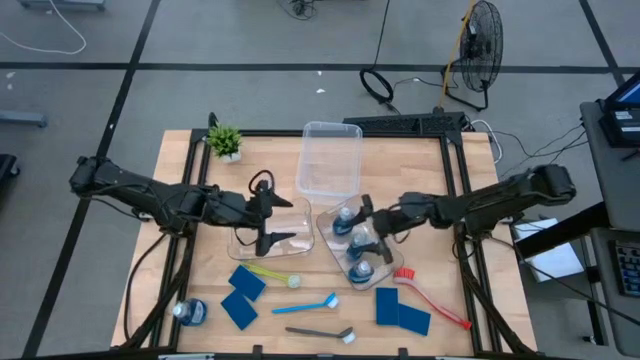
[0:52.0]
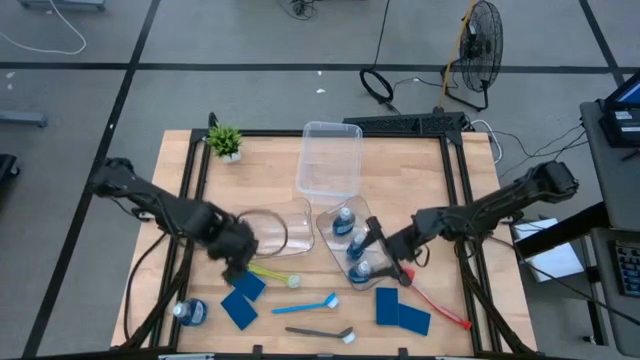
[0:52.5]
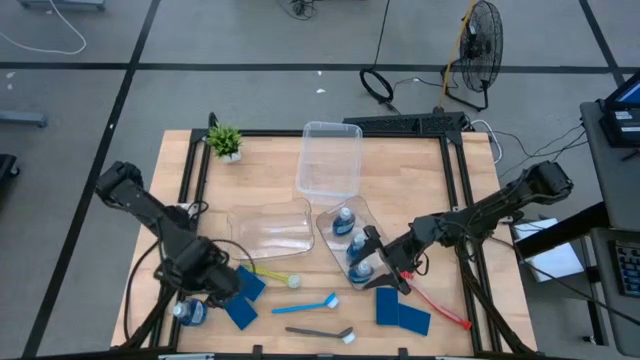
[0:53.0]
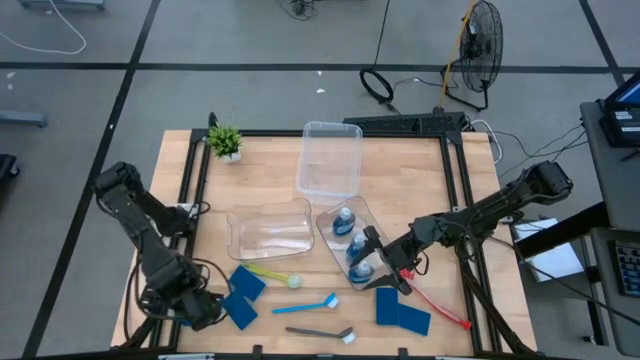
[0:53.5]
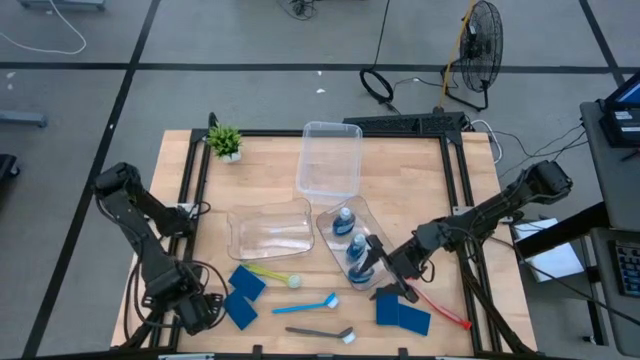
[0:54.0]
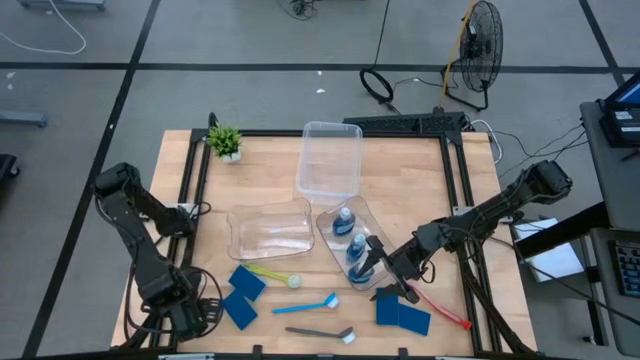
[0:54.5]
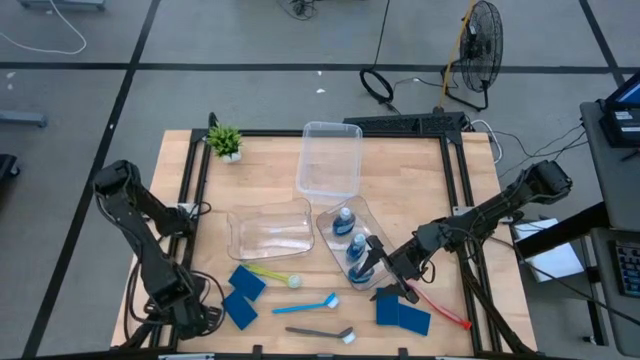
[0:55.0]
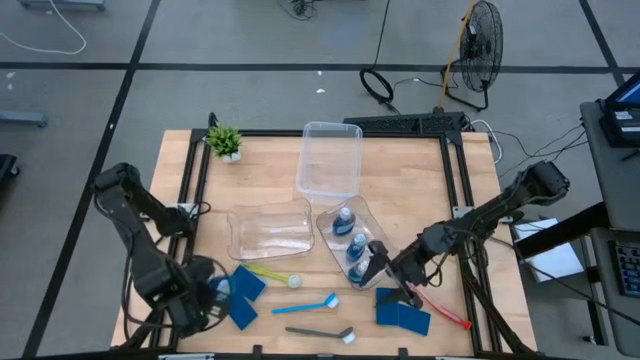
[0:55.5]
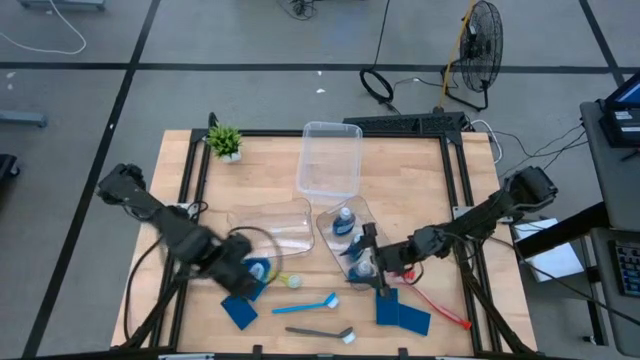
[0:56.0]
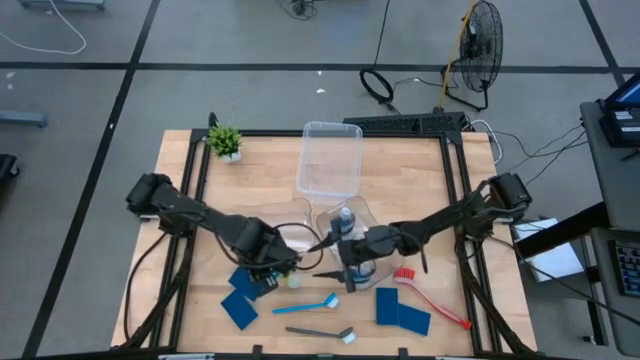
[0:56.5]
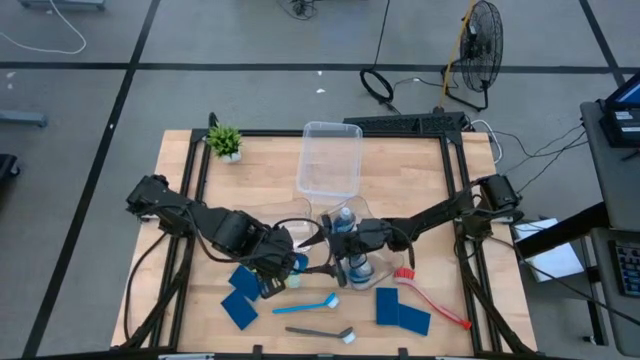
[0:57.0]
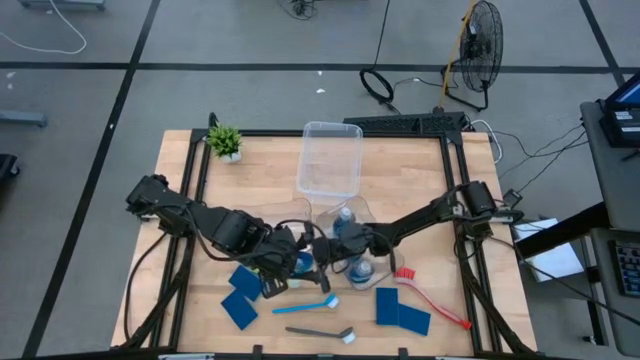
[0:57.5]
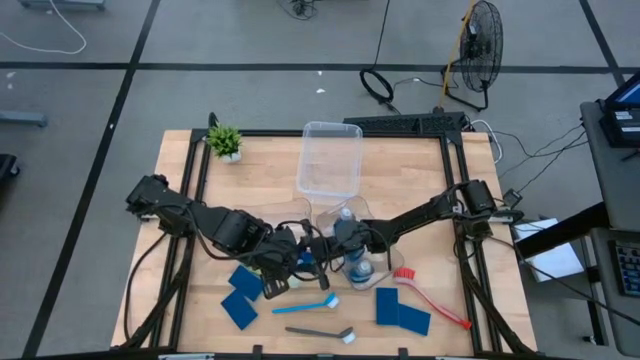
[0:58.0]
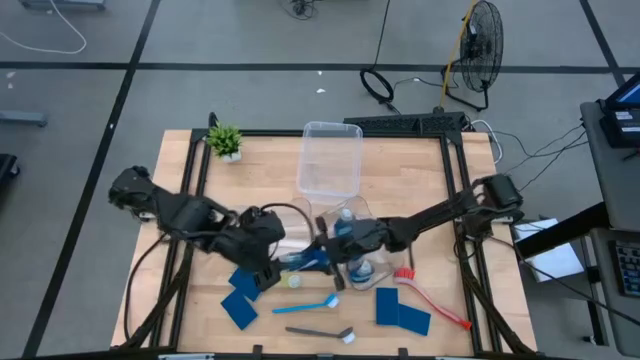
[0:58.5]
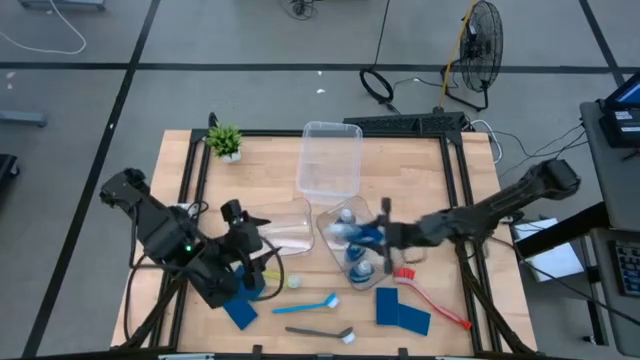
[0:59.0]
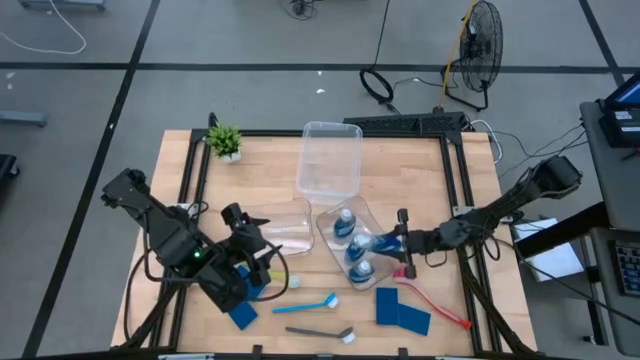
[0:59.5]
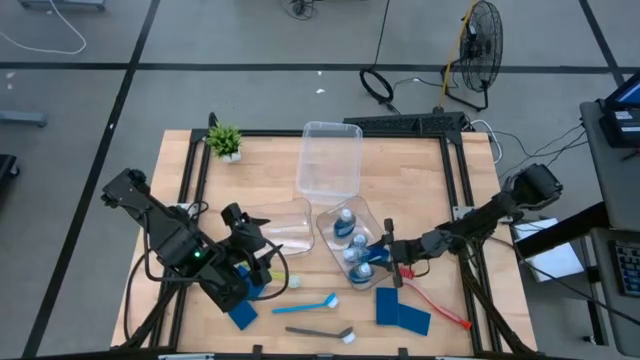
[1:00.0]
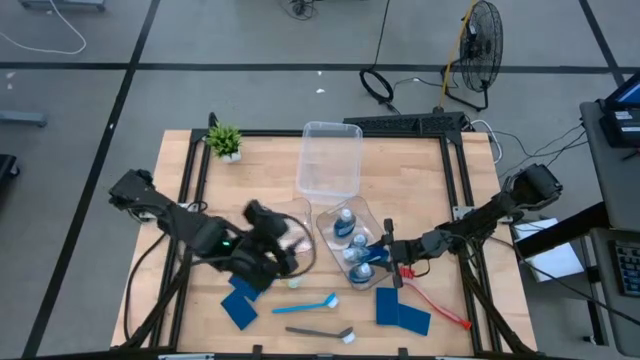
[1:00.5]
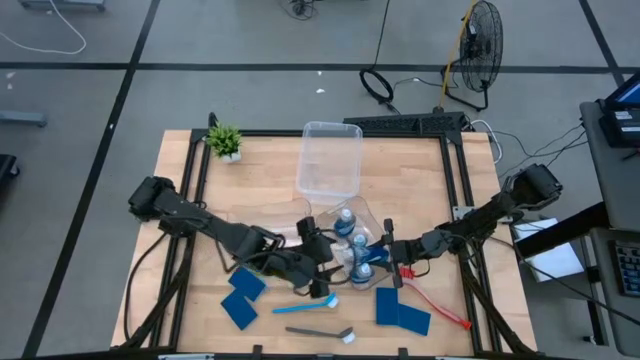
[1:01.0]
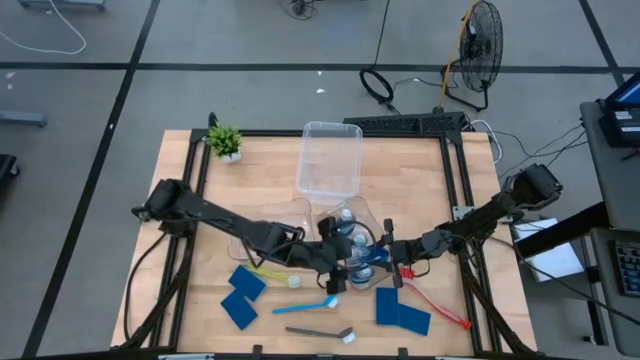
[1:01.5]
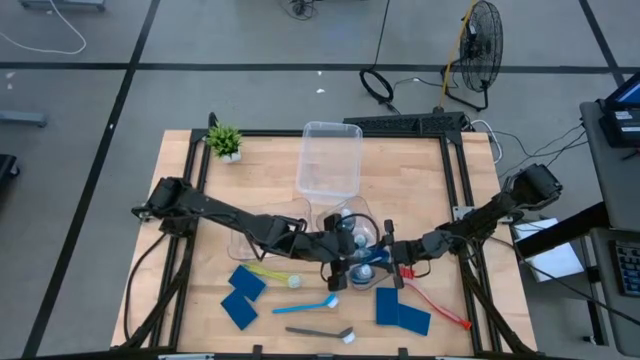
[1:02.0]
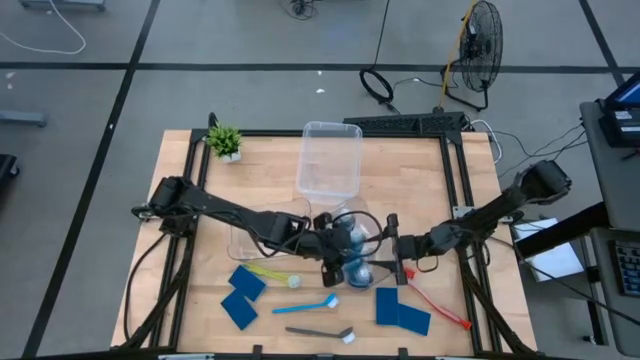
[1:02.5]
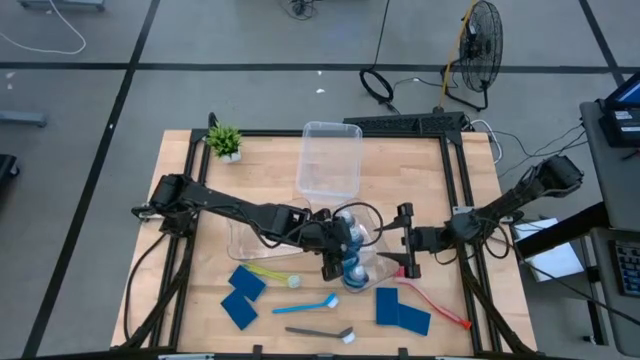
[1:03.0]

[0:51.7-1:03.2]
Task: Pick & Place Kitchen Sink Supplies
Put the blue soap dispenser into the right transparent bin

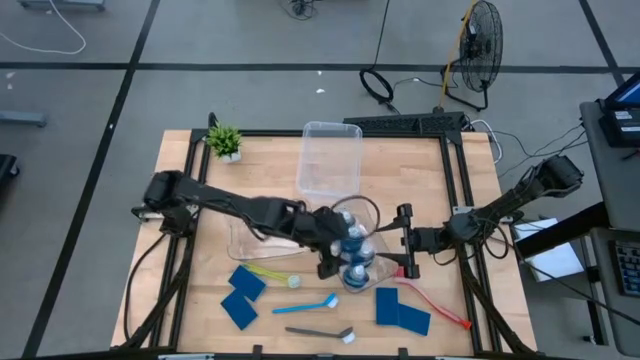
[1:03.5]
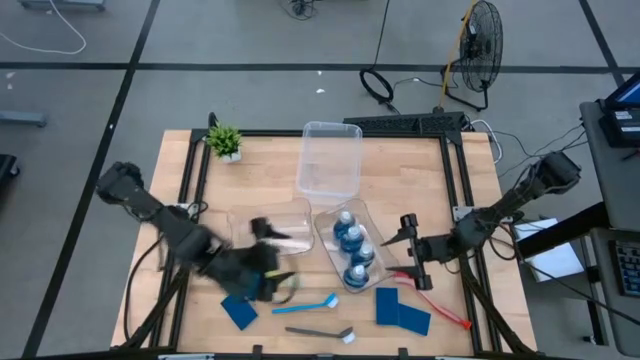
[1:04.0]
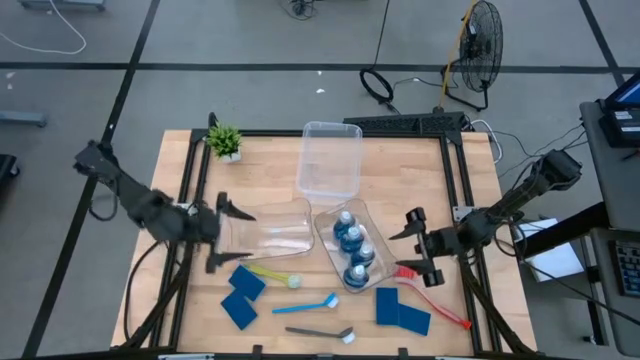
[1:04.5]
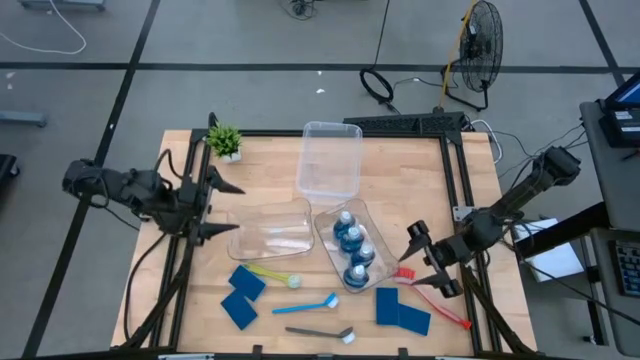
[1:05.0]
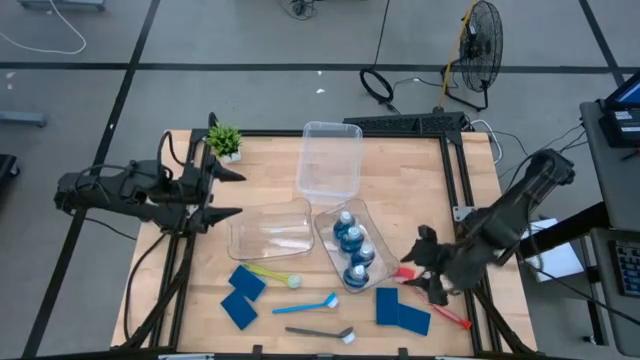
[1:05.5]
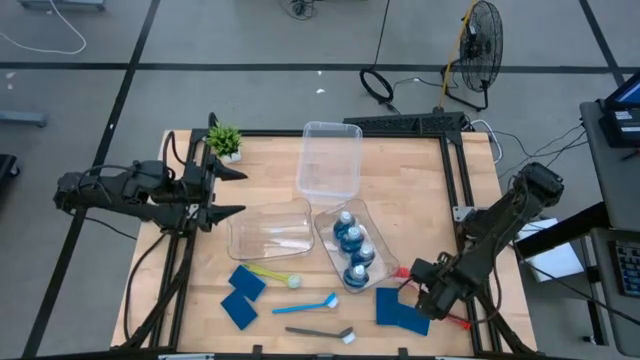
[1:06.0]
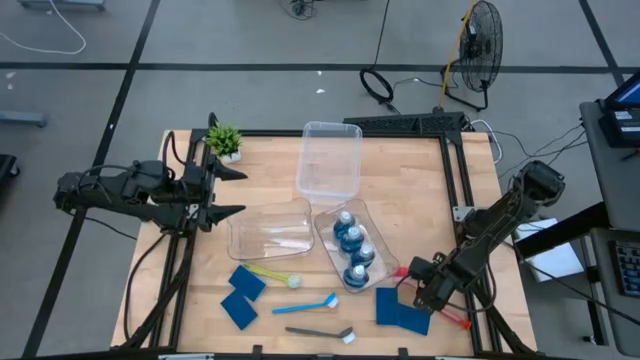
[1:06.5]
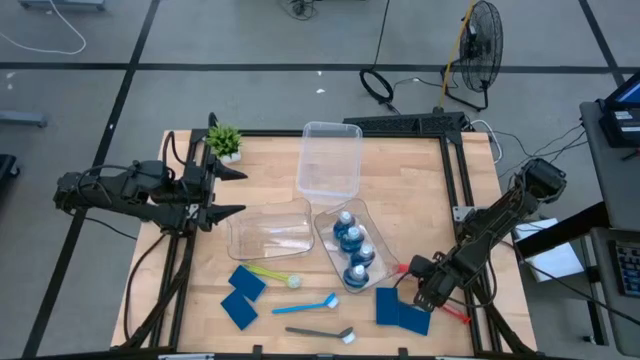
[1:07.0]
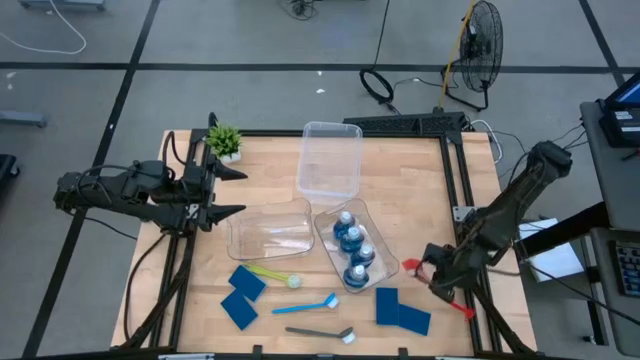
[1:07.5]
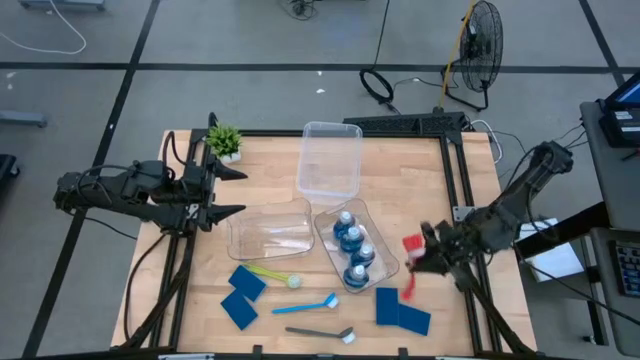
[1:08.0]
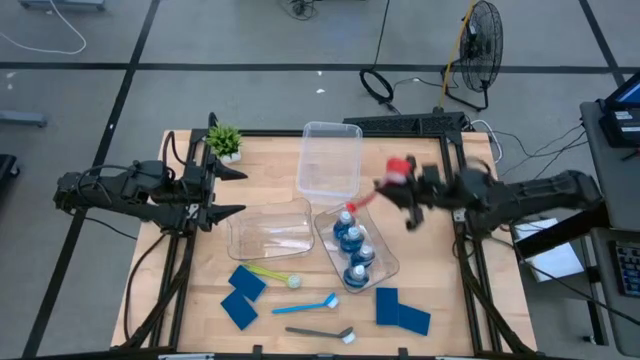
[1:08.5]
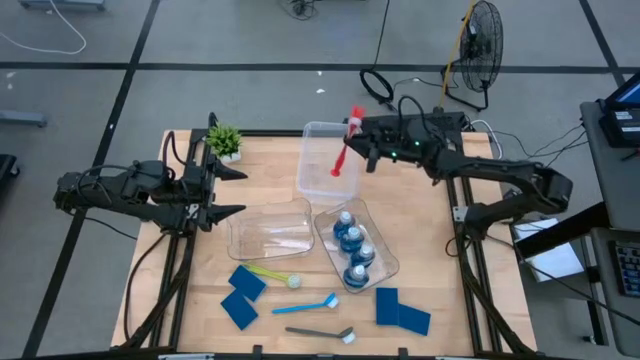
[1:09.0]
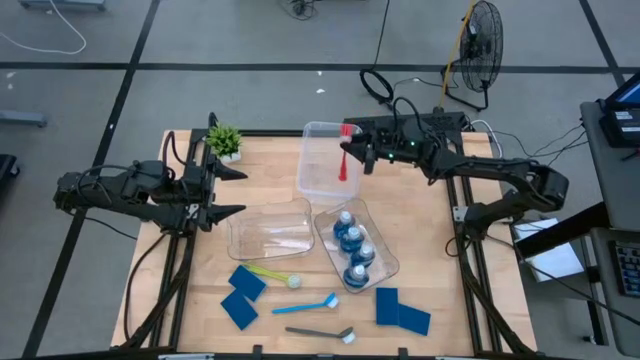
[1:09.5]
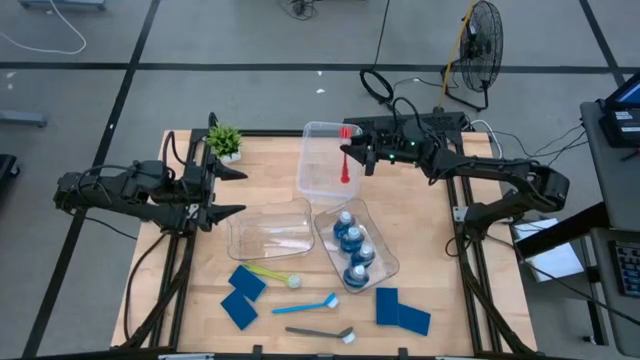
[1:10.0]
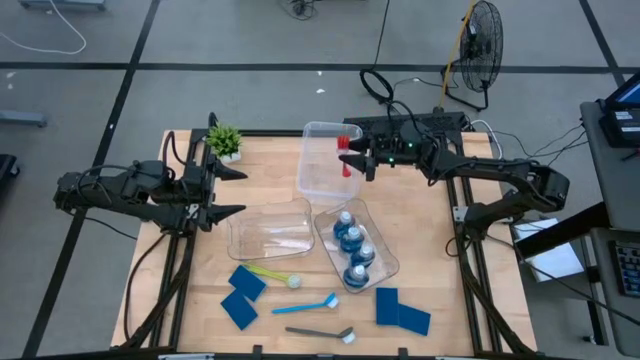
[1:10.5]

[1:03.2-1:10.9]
Put the red dish brush into the transparent container
